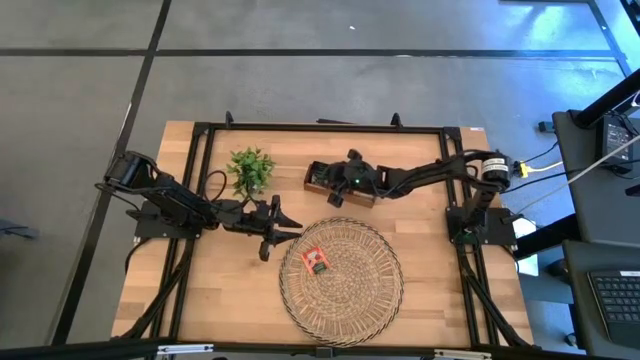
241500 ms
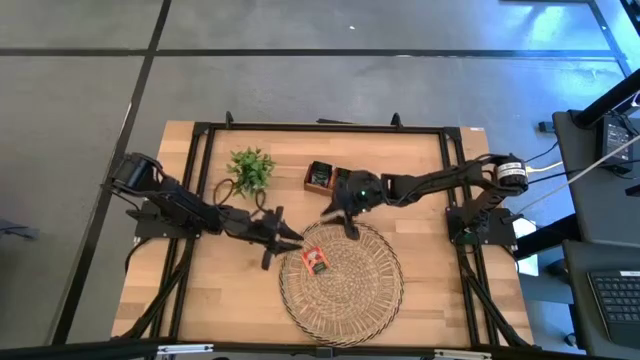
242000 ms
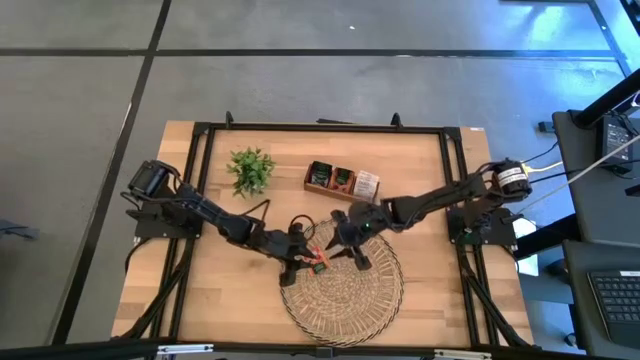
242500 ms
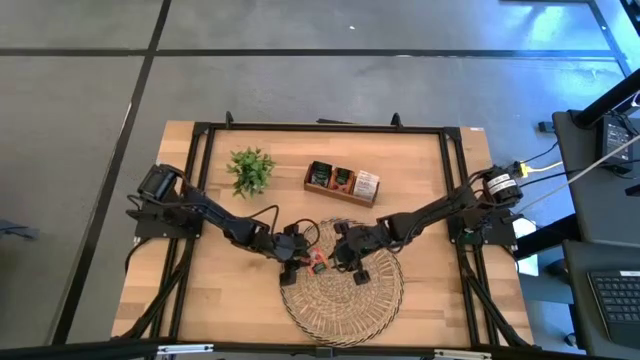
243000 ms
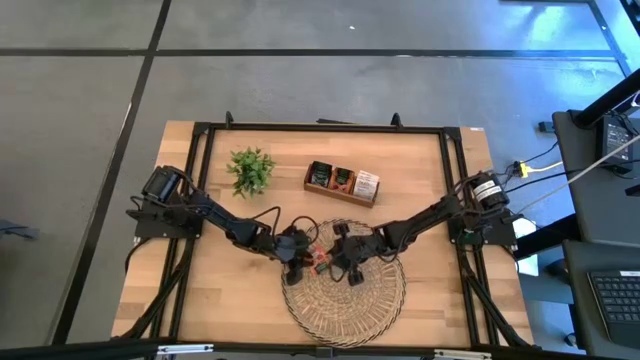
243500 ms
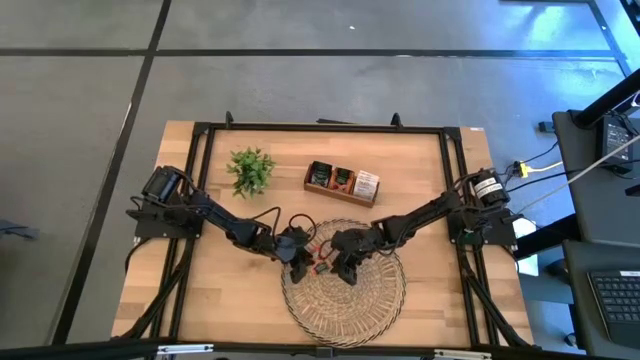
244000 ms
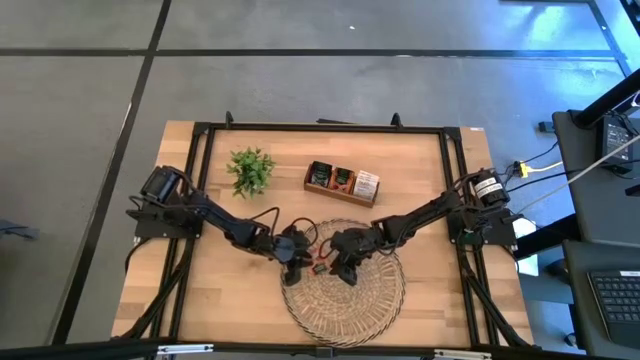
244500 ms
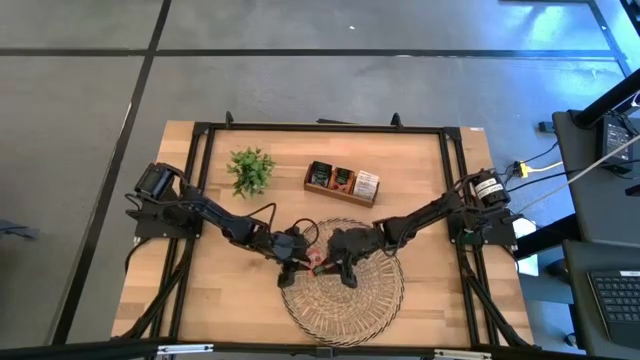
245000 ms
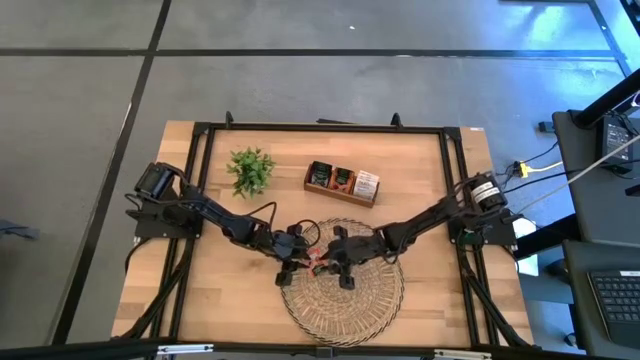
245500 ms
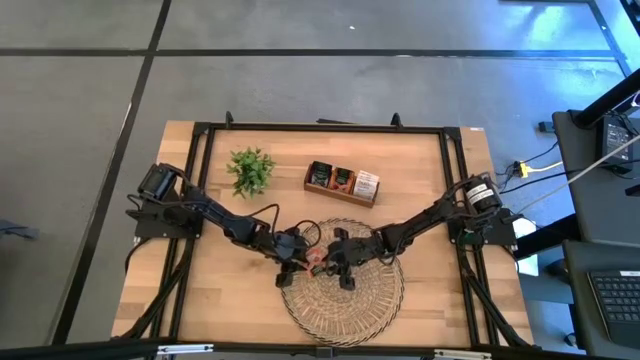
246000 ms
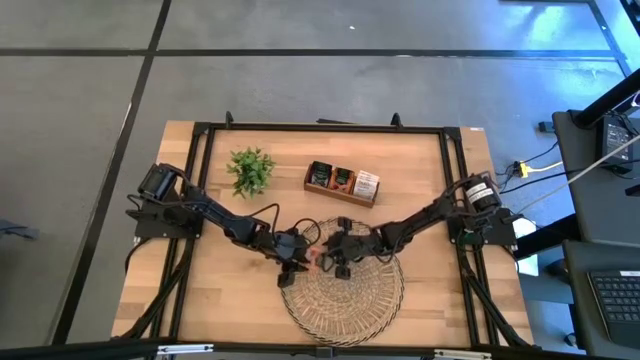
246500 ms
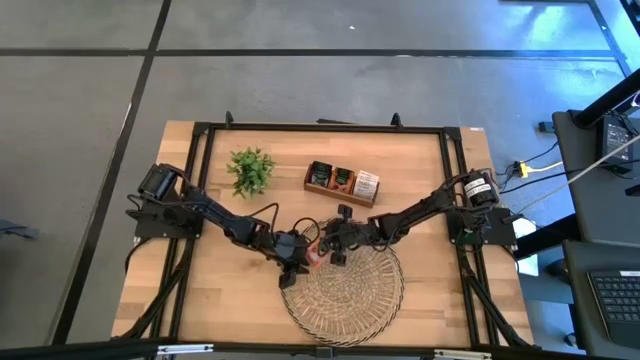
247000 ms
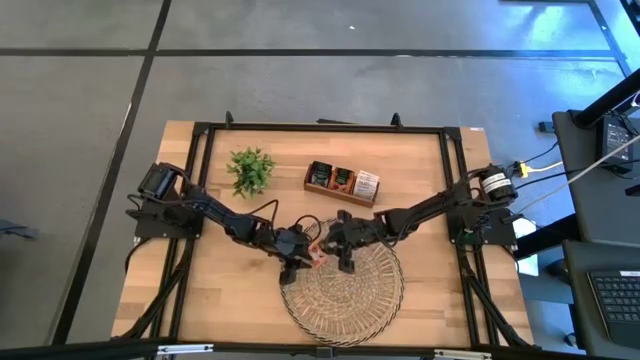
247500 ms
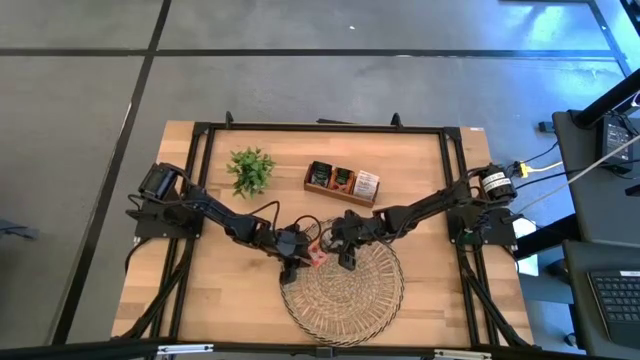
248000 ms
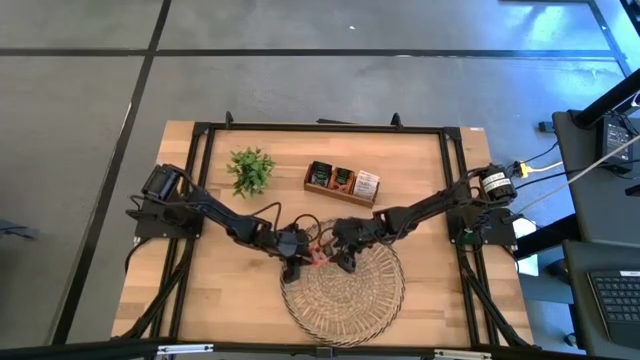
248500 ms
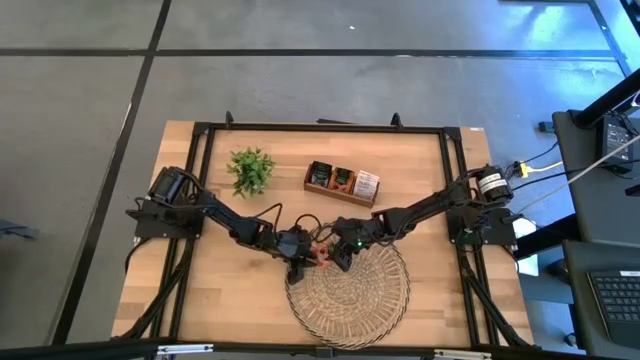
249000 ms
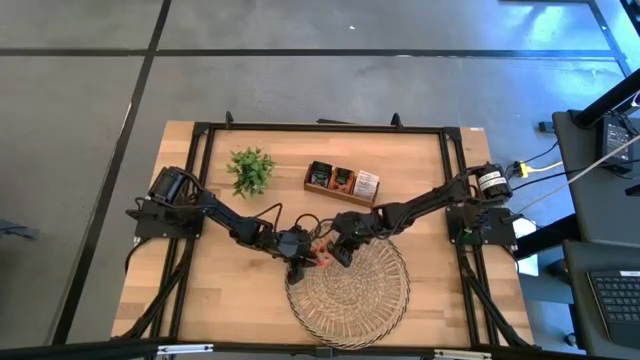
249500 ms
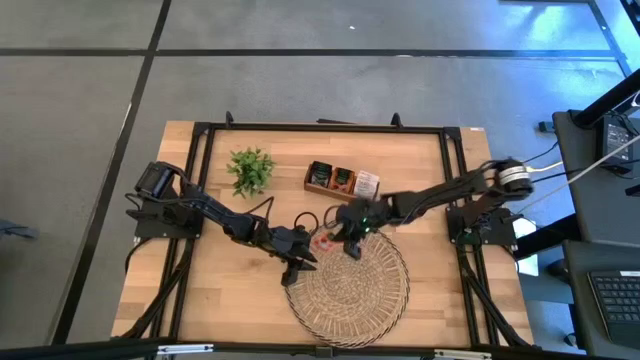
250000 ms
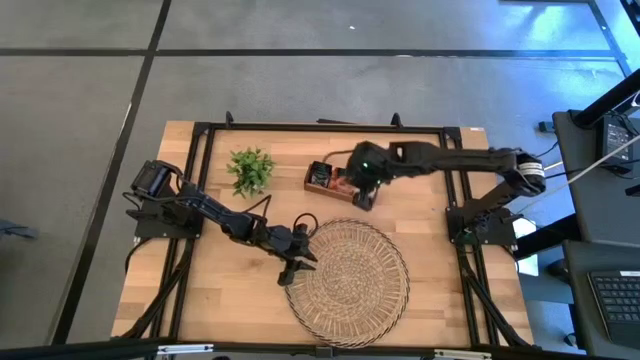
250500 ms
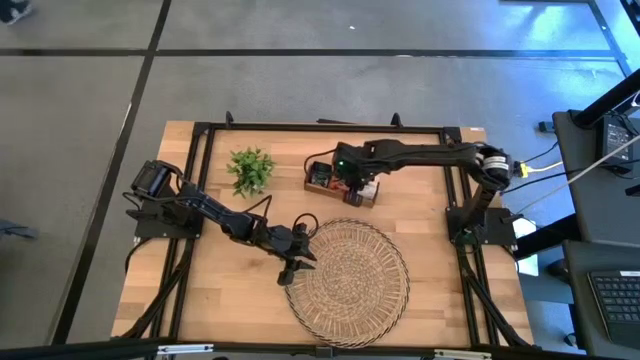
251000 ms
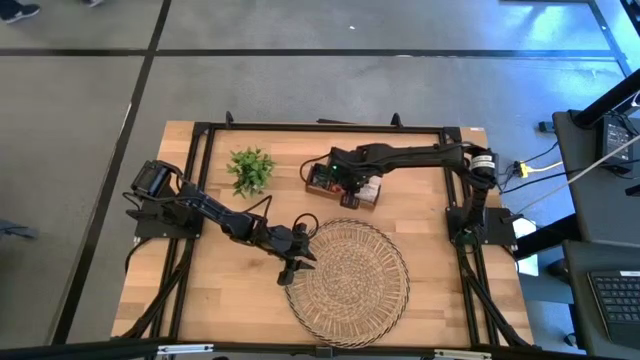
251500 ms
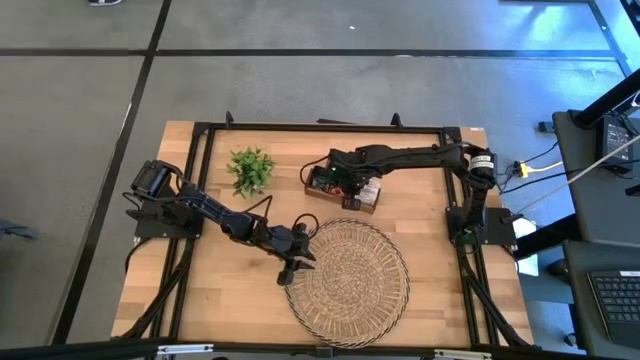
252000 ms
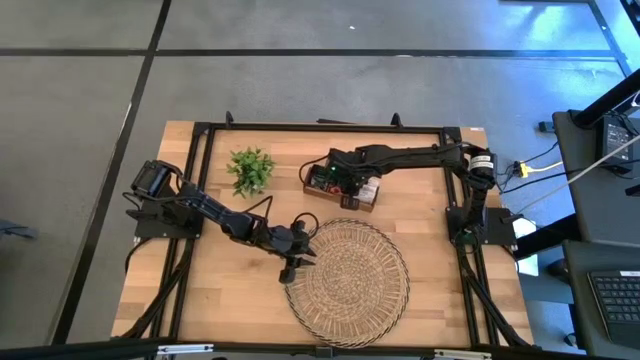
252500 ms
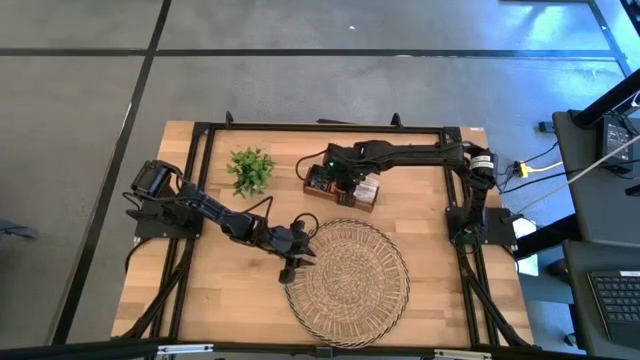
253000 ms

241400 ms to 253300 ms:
Task: Pick & Place Tea
Put the orange tea bag into the middle section of the wooden organizer

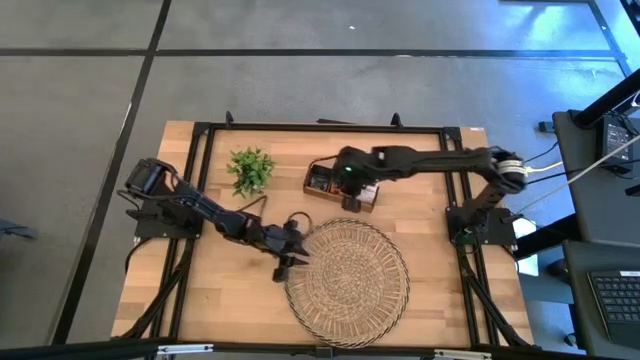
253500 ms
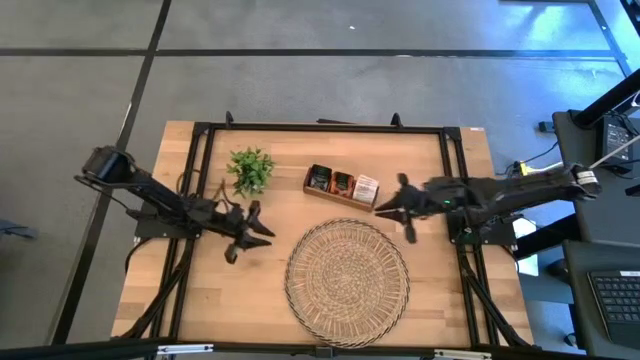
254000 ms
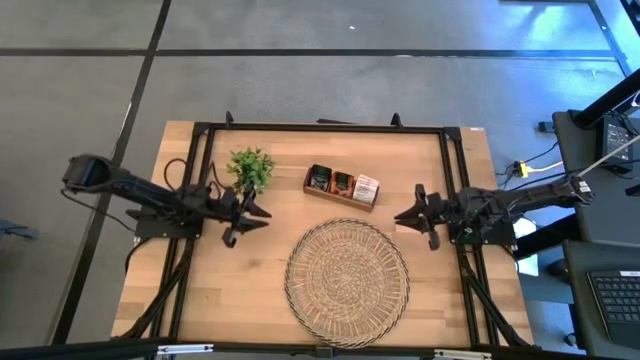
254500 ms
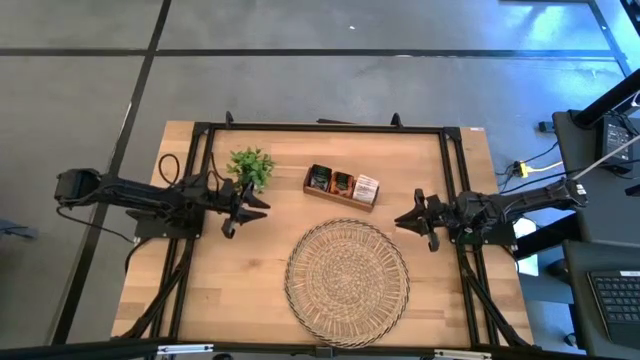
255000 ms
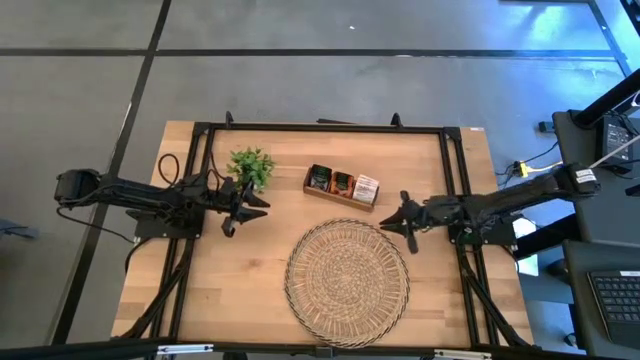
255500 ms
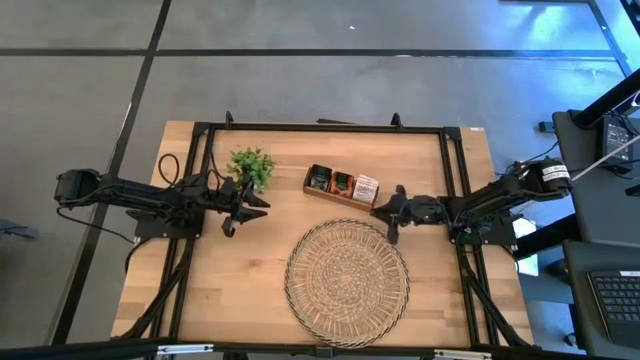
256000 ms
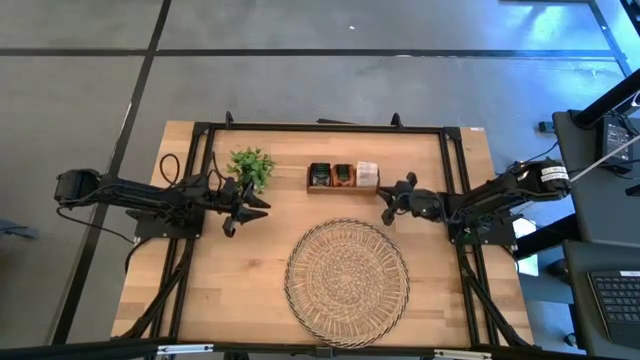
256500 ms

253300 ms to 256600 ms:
Adjust the wooden organizer on the table

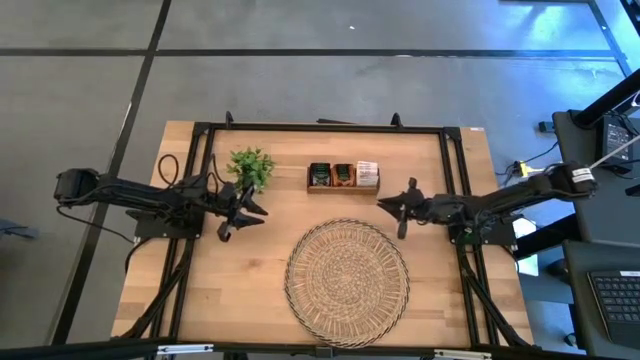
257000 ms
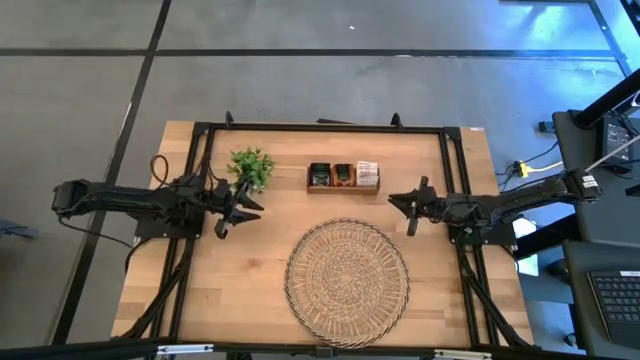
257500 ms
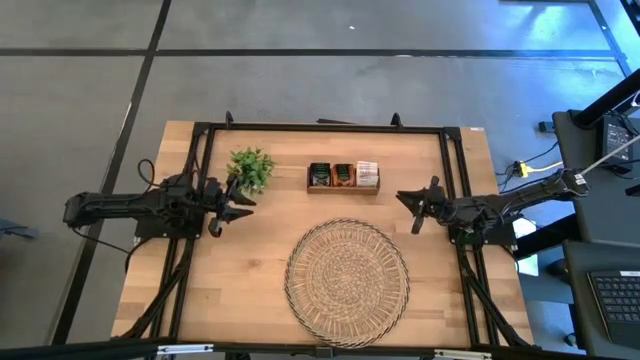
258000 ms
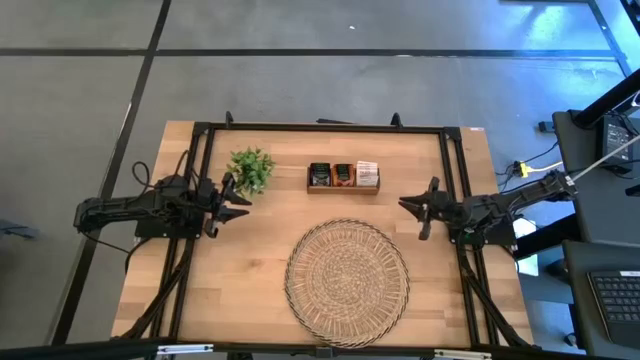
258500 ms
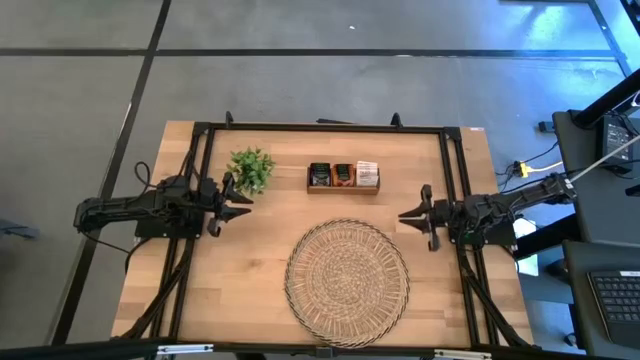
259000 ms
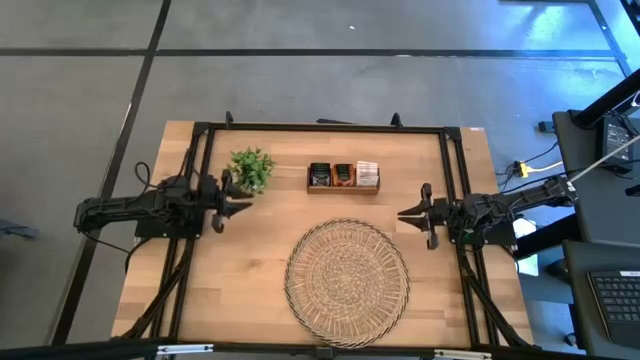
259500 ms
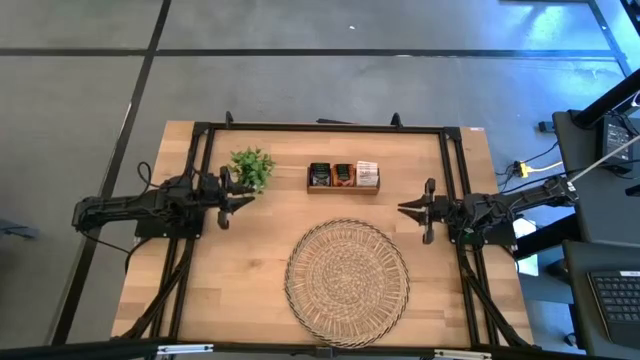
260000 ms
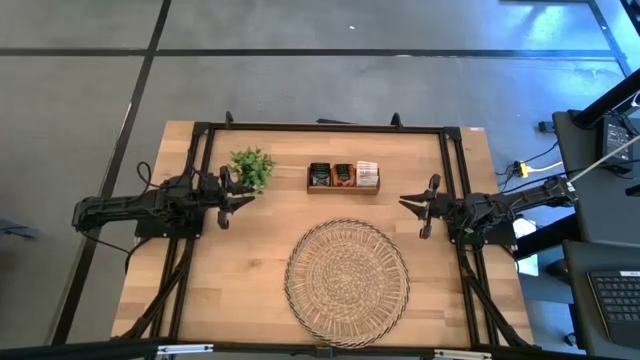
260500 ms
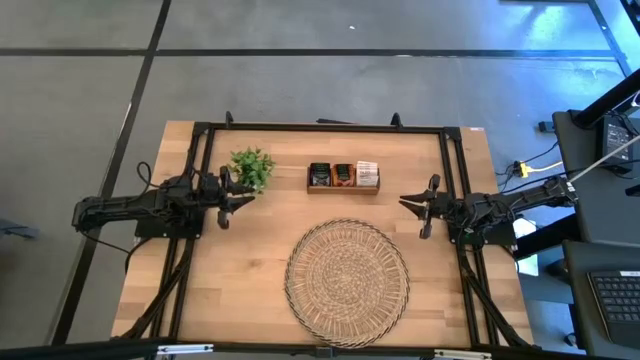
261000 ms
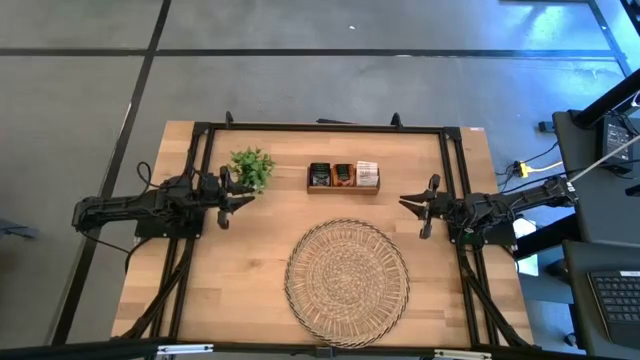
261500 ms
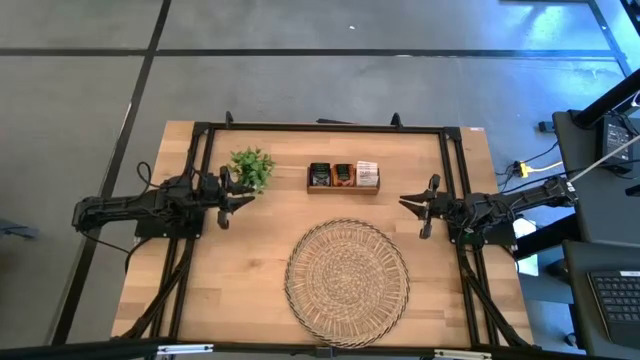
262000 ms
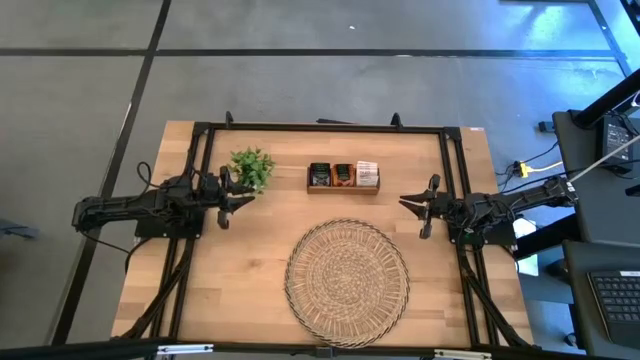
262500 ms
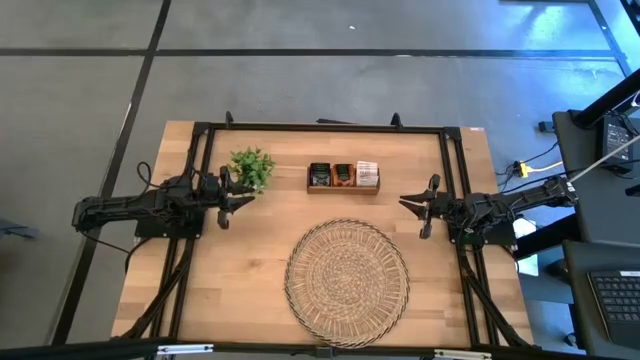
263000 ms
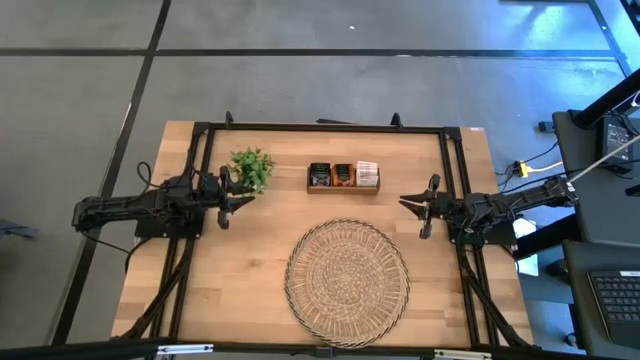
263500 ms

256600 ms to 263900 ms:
Return to home position
